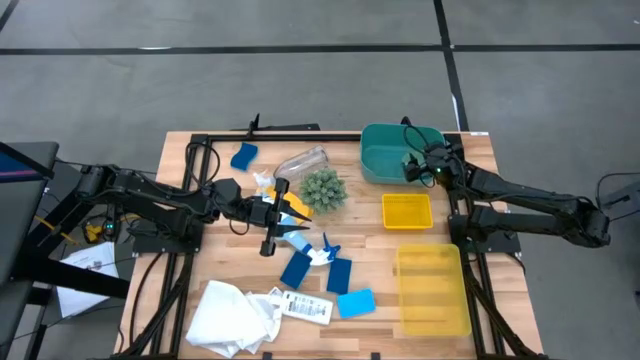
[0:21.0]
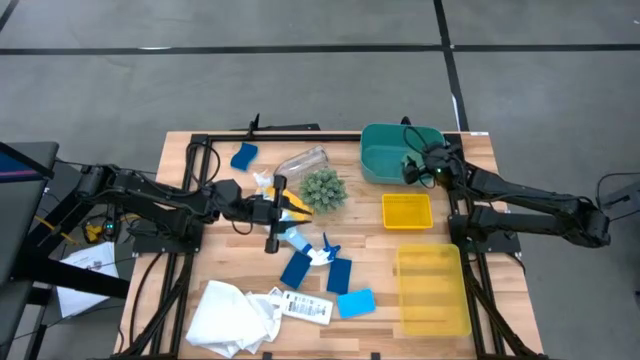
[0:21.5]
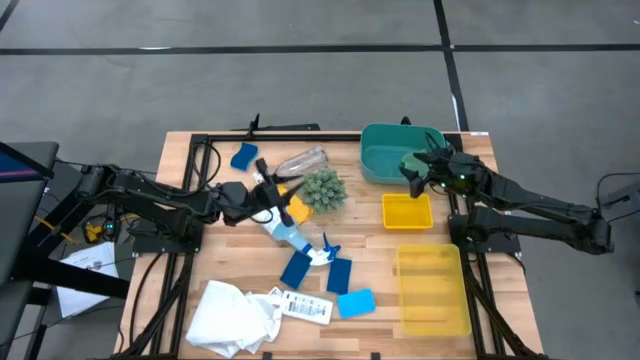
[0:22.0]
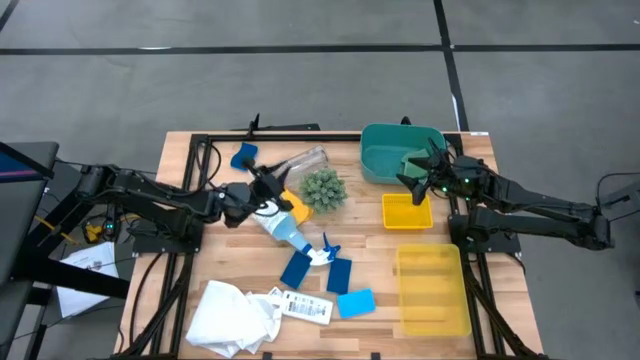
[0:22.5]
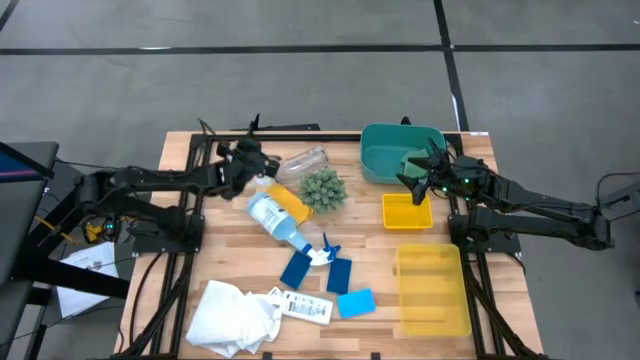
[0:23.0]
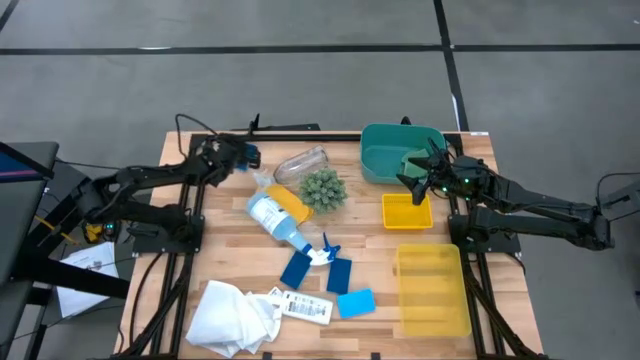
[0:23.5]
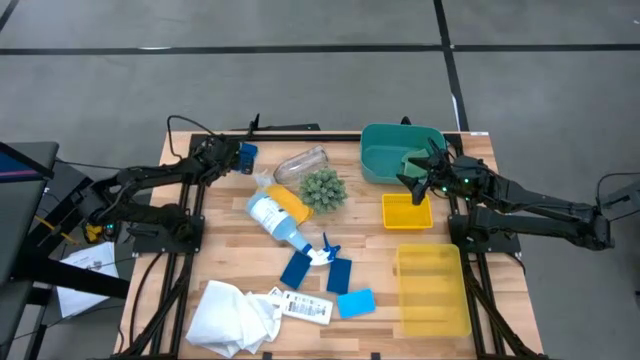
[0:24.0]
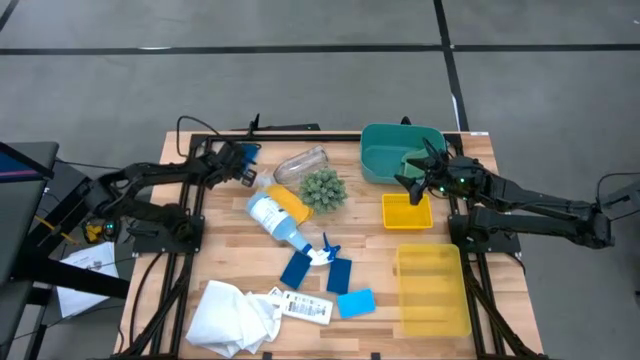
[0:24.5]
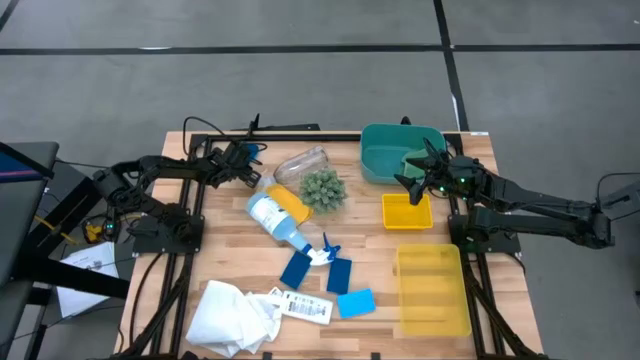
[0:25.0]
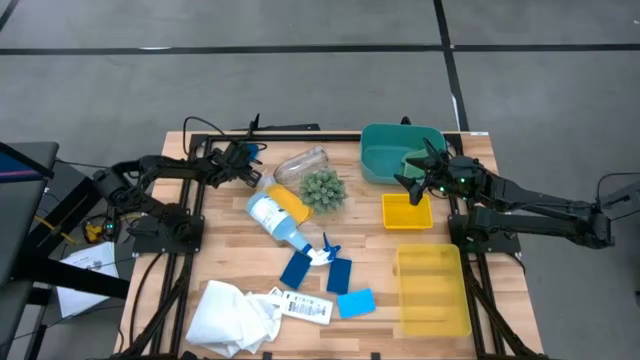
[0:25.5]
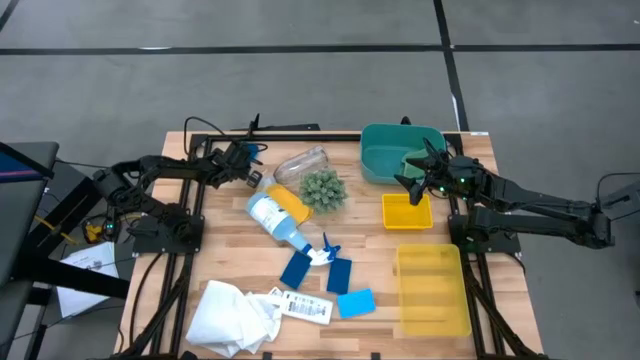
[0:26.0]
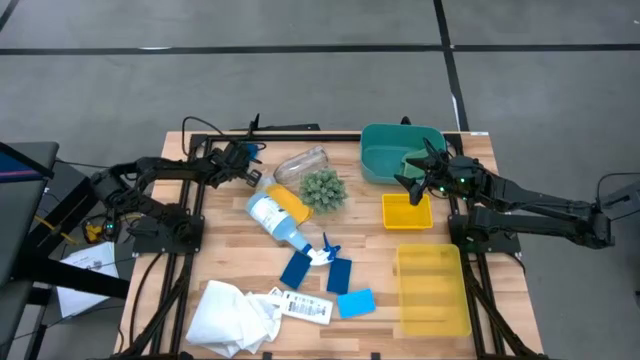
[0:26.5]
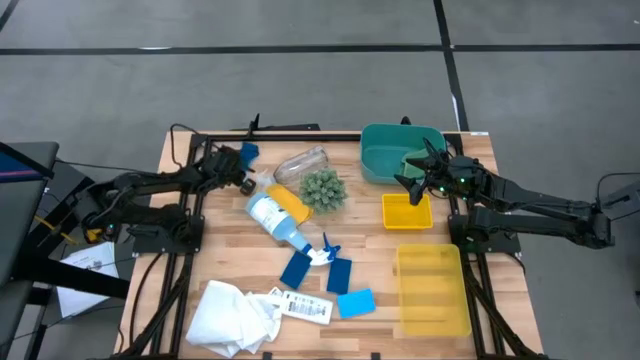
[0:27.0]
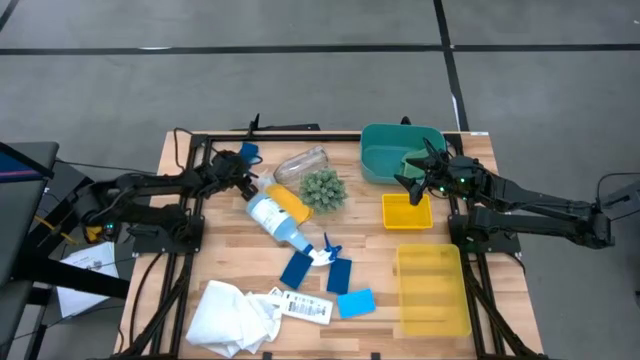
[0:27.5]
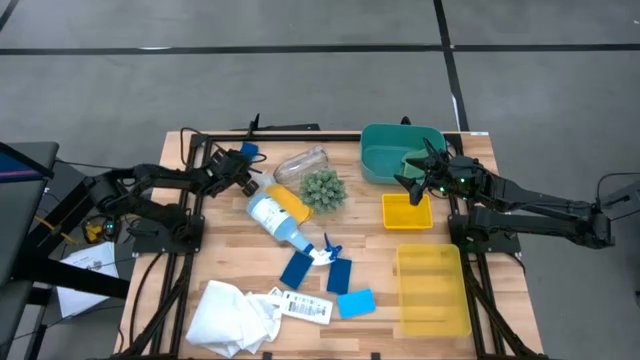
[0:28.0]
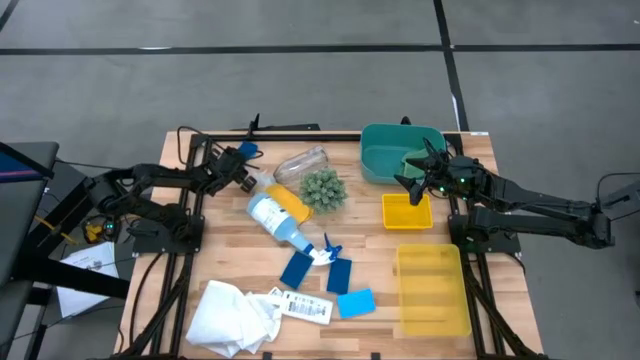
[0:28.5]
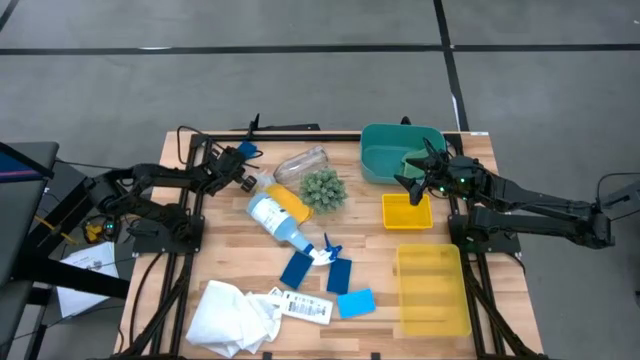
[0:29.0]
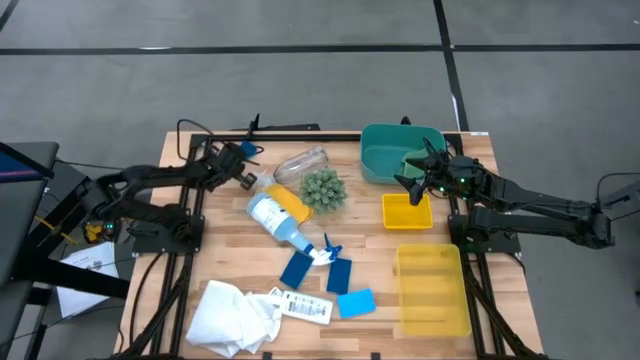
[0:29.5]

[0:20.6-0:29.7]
Task: Pick & Place Kitchen Items
Put the blue sponge into the top yellow bin

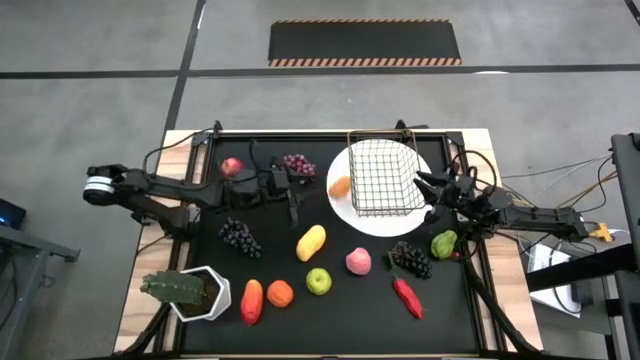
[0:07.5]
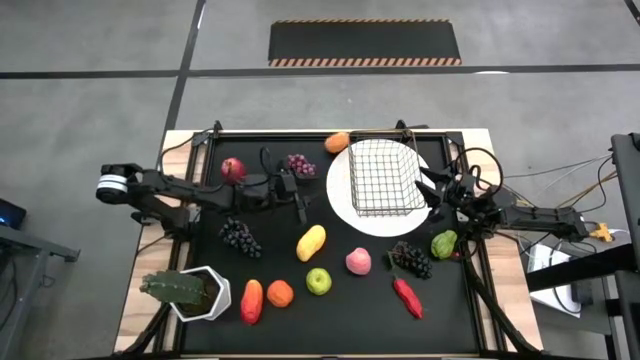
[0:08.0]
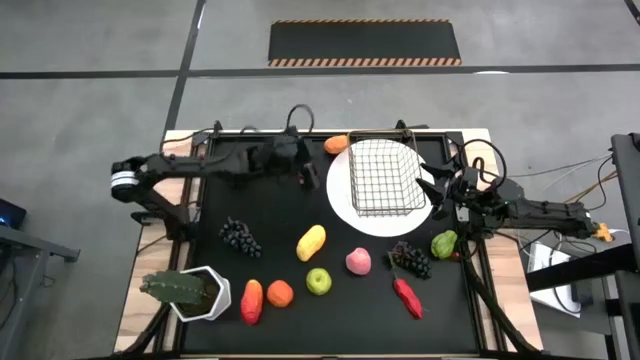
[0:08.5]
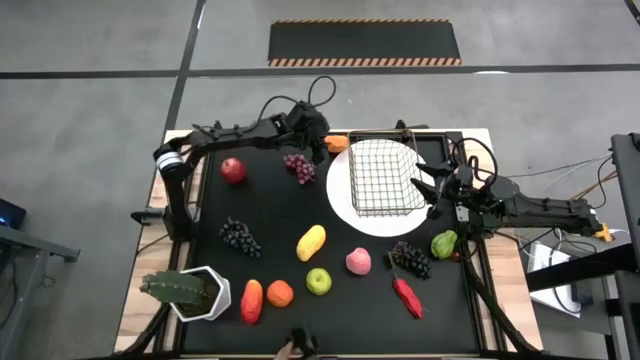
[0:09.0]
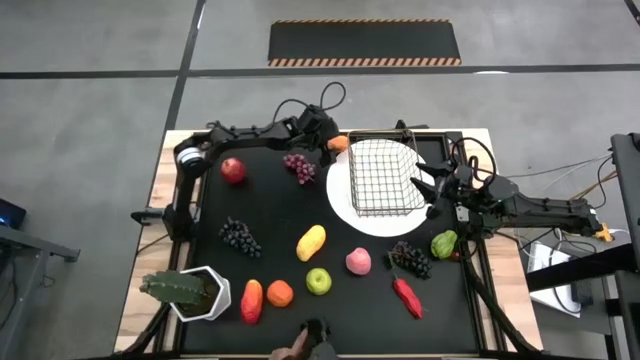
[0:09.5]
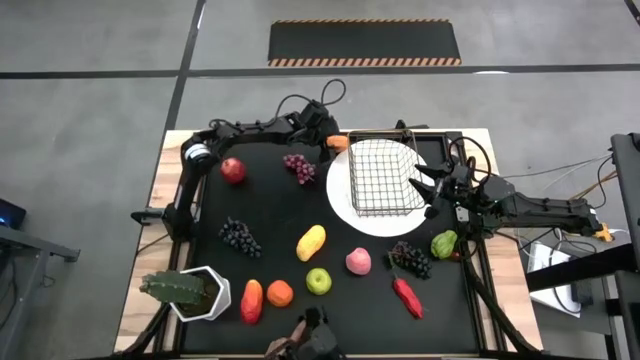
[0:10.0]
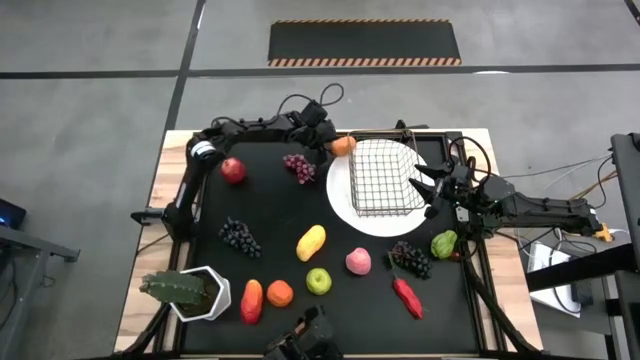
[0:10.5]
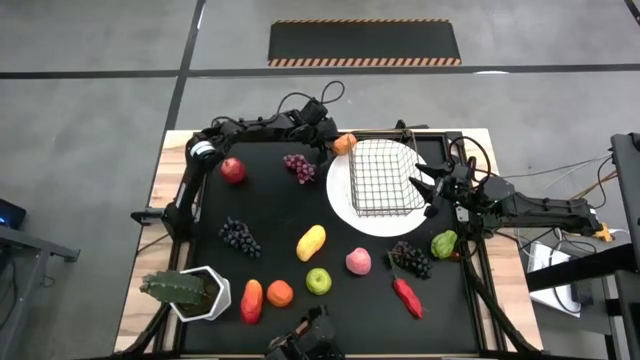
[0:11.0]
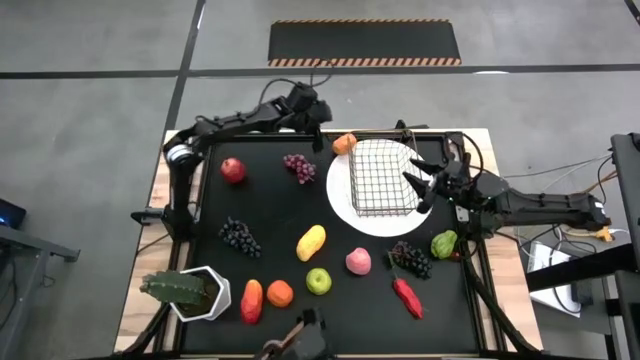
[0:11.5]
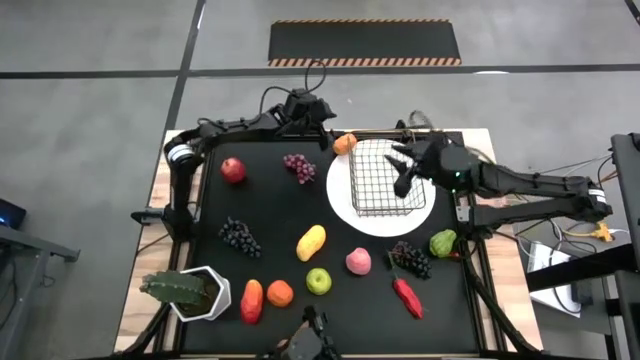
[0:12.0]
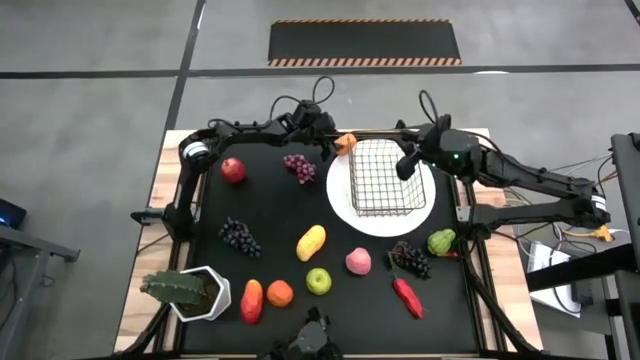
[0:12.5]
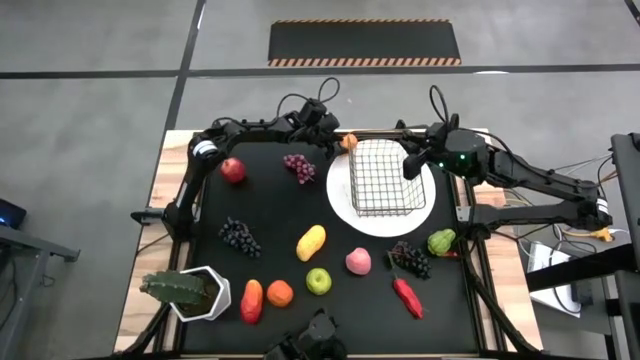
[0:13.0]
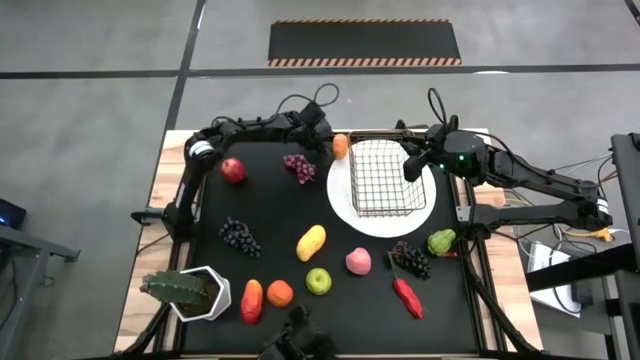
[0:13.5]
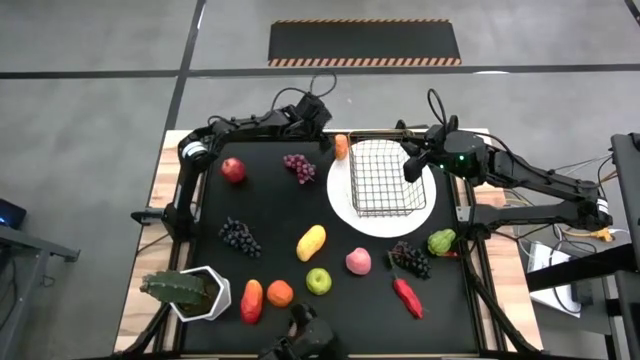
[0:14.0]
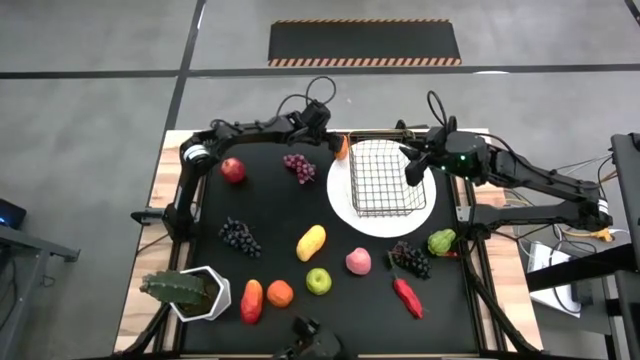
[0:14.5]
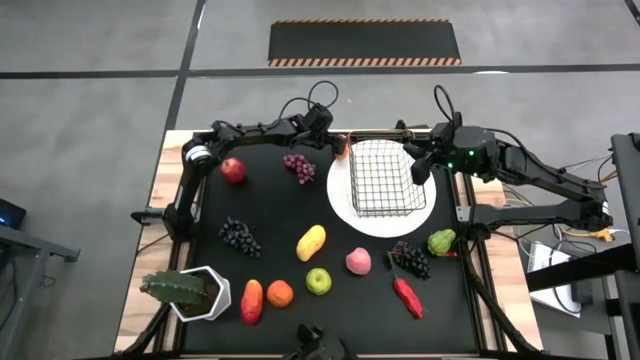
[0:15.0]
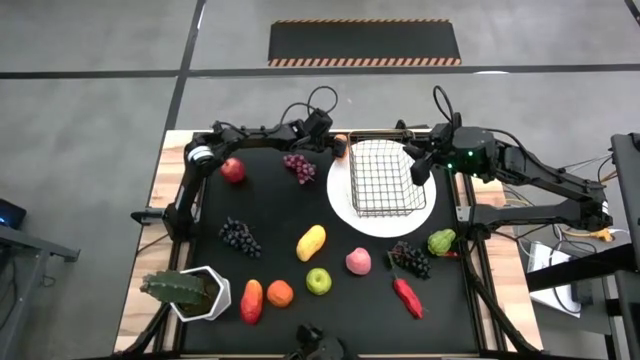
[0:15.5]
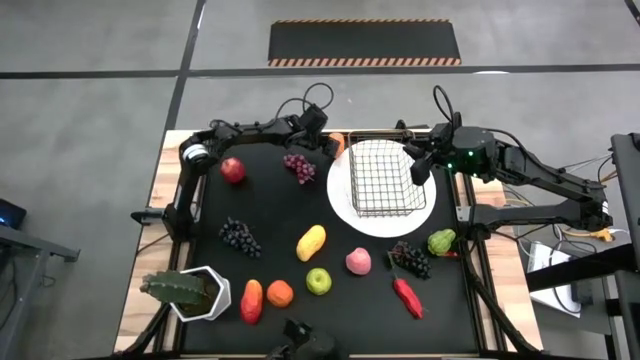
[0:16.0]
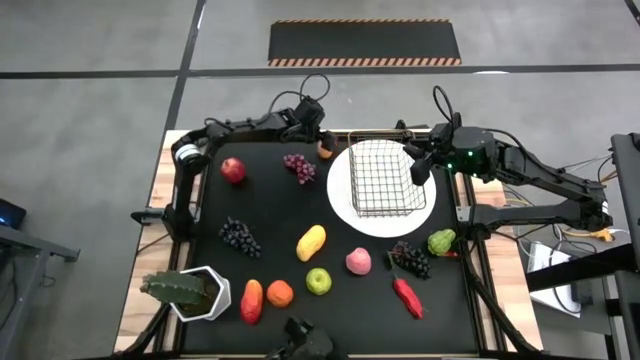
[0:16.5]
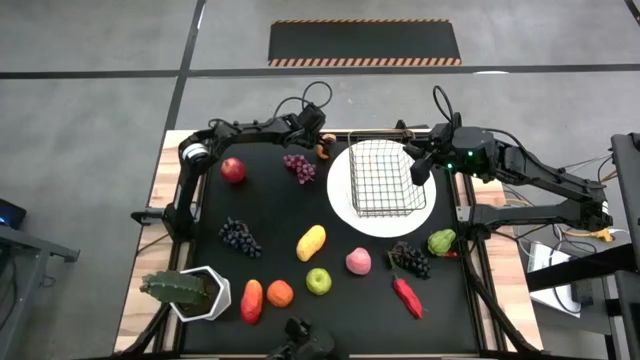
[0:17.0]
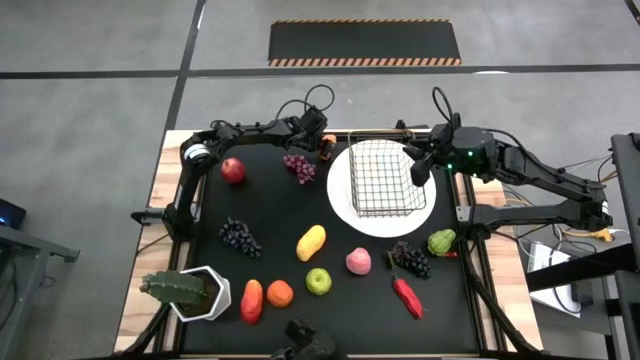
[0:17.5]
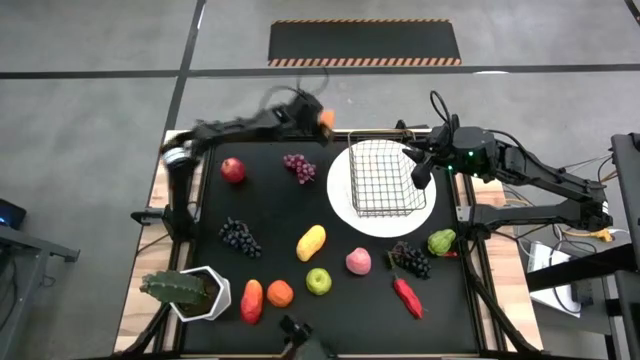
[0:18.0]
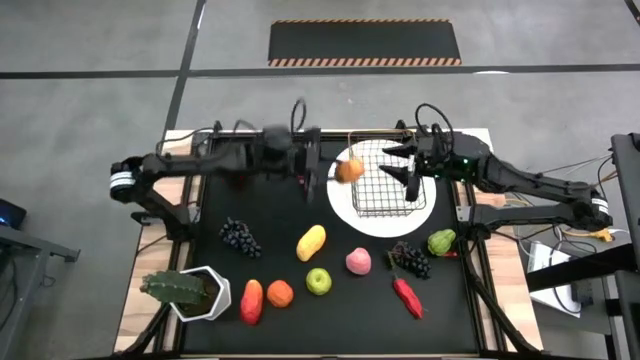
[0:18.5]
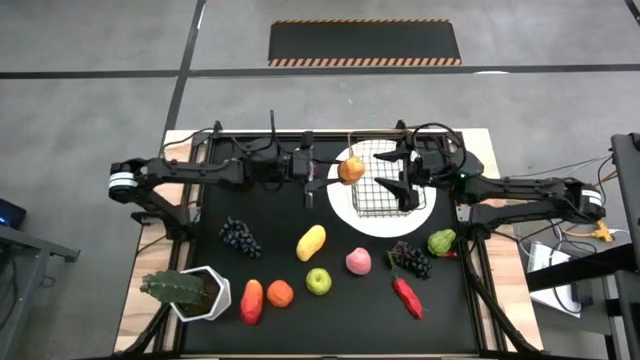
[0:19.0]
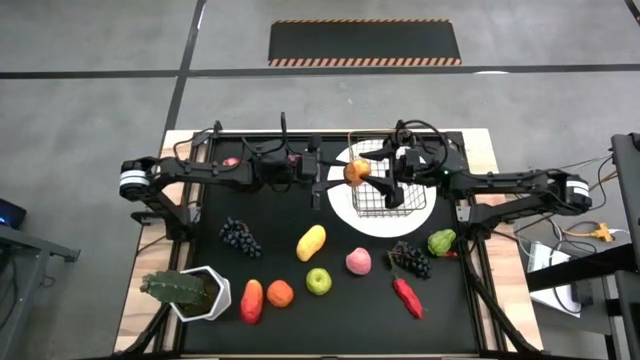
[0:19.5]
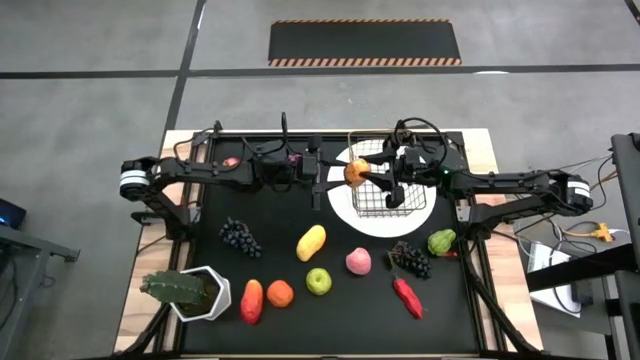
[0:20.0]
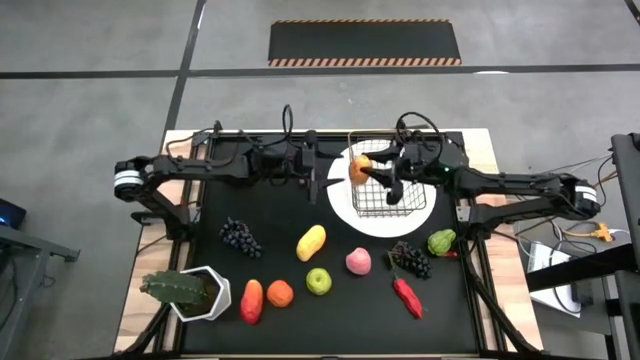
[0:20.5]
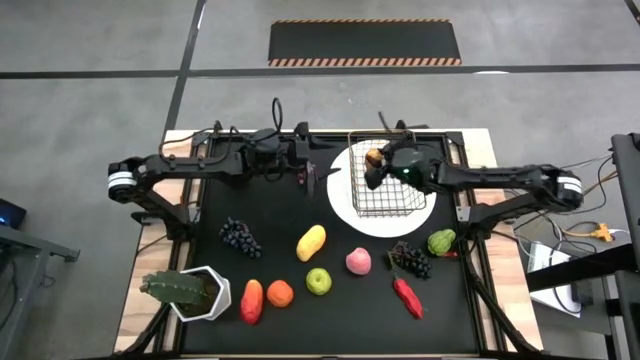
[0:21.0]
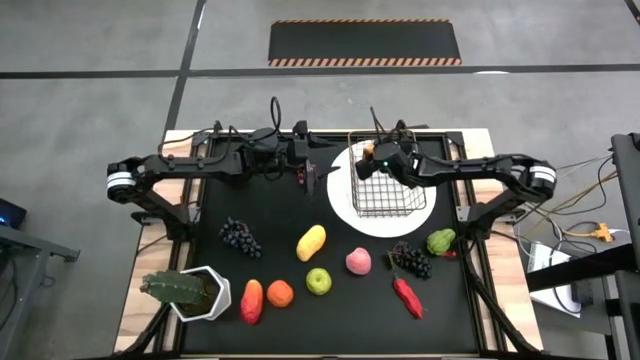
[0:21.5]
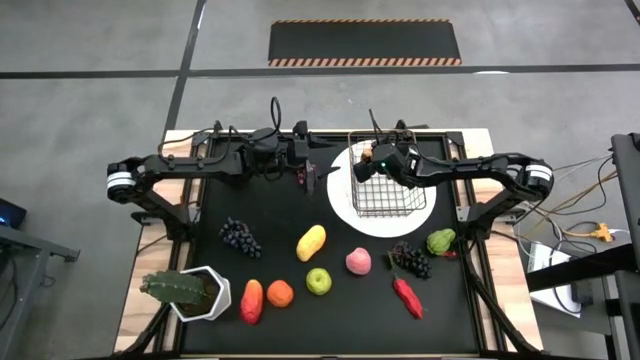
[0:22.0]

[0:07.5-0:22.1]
Task: Build produce basket
Put the orange mango into the wire basket
